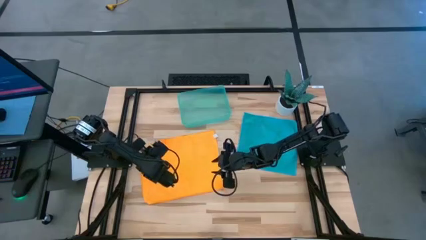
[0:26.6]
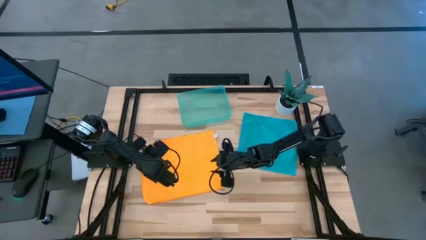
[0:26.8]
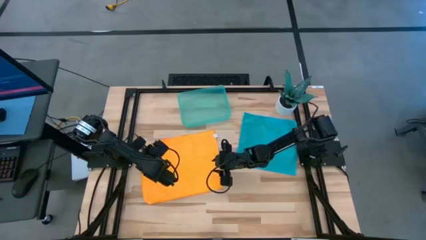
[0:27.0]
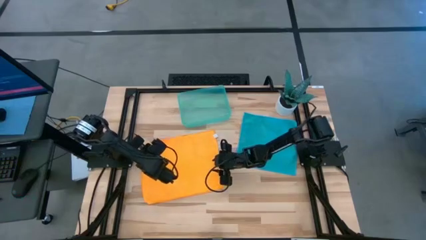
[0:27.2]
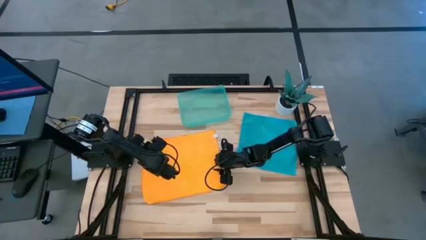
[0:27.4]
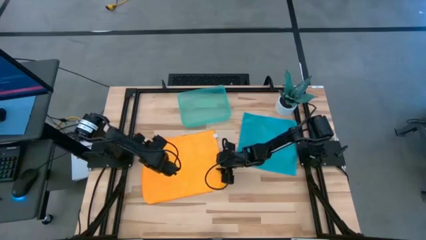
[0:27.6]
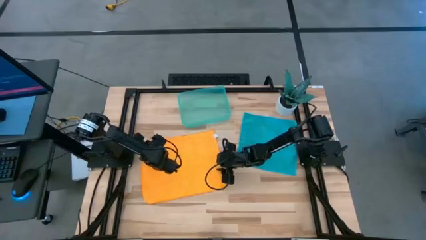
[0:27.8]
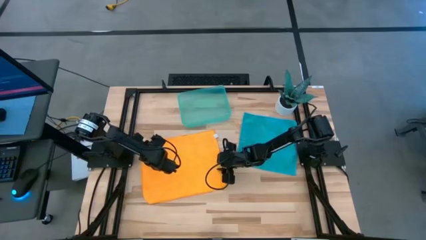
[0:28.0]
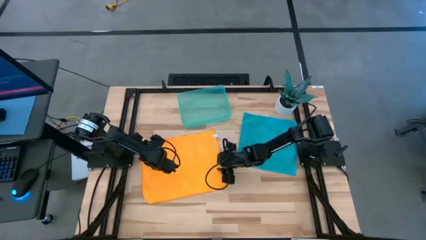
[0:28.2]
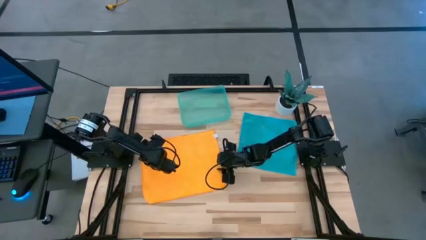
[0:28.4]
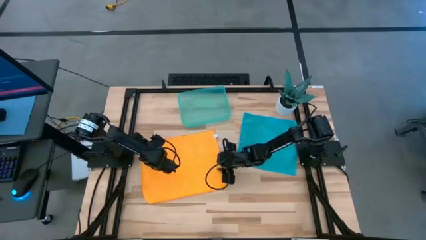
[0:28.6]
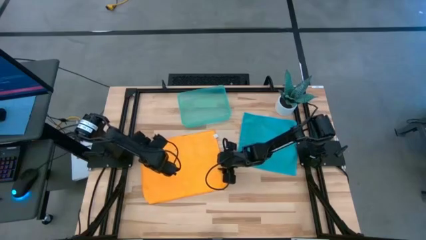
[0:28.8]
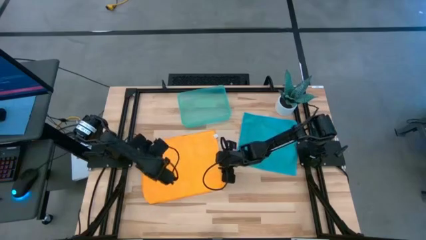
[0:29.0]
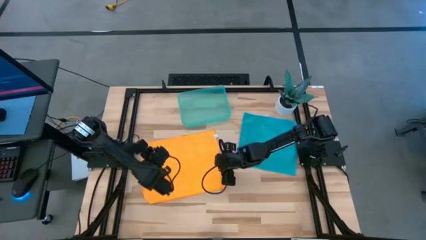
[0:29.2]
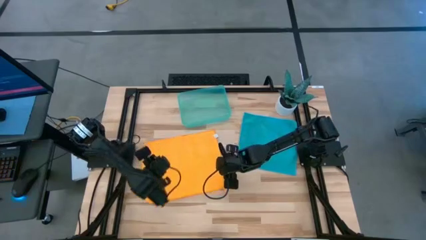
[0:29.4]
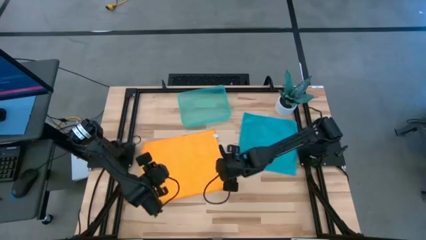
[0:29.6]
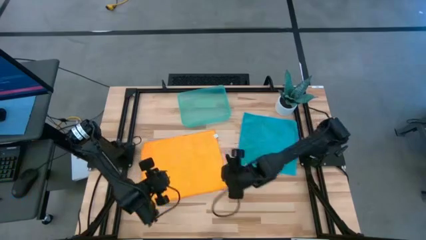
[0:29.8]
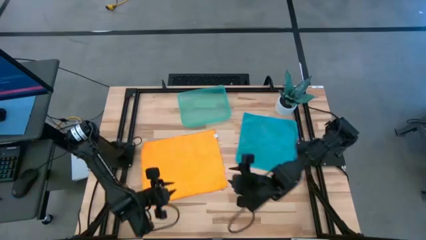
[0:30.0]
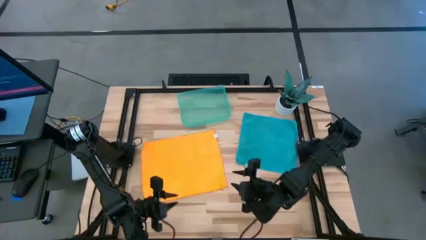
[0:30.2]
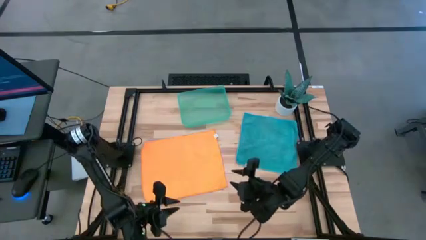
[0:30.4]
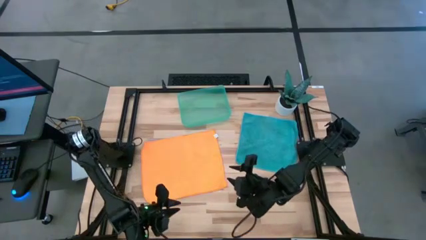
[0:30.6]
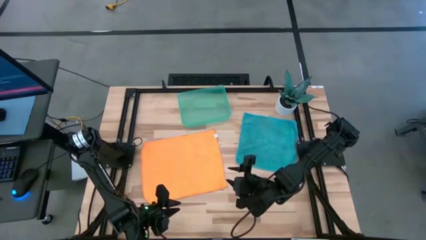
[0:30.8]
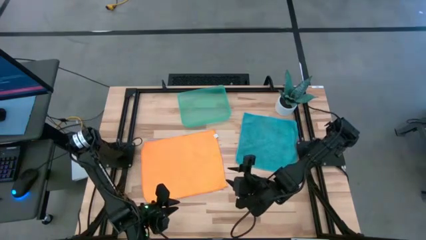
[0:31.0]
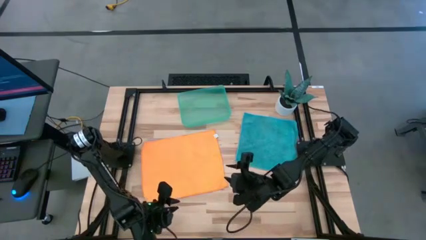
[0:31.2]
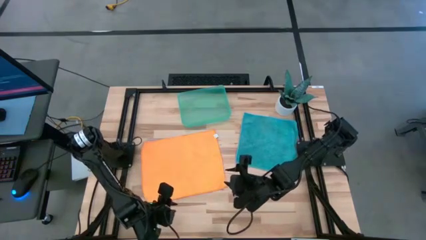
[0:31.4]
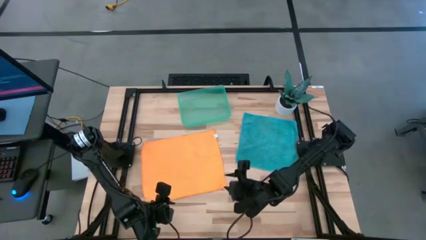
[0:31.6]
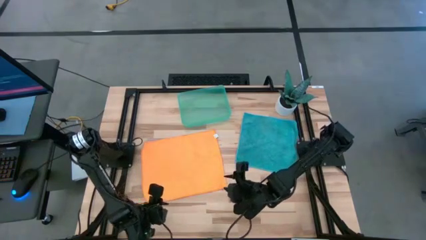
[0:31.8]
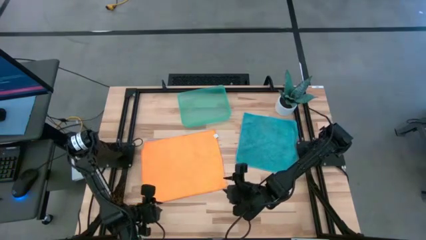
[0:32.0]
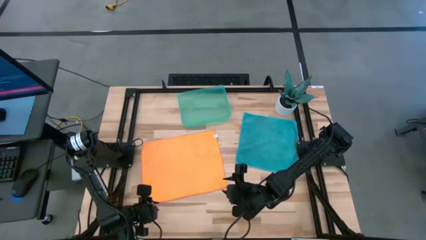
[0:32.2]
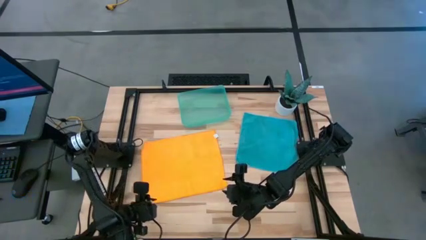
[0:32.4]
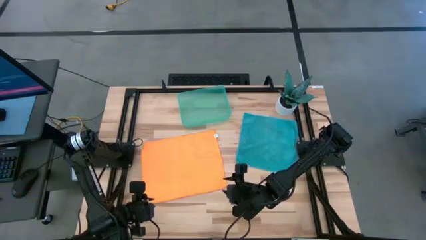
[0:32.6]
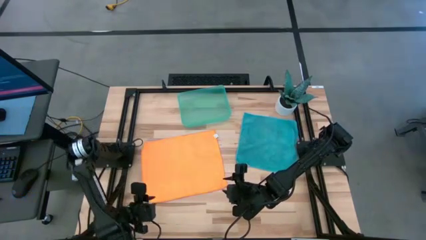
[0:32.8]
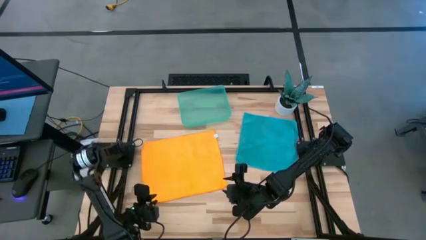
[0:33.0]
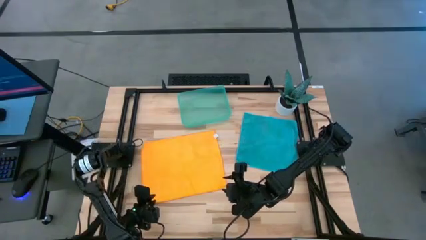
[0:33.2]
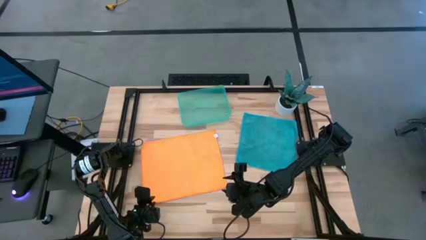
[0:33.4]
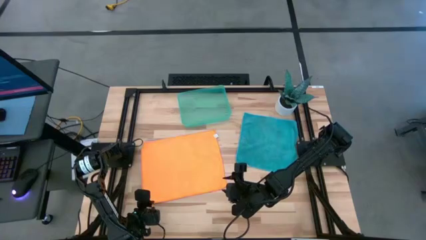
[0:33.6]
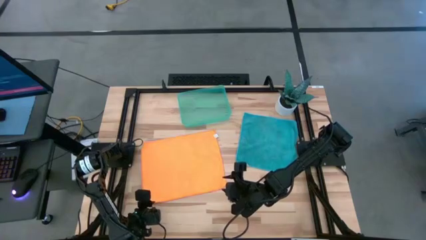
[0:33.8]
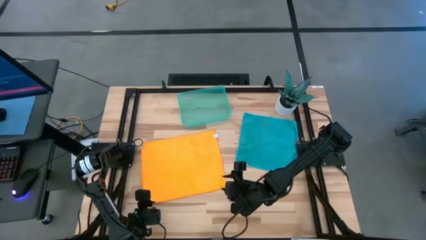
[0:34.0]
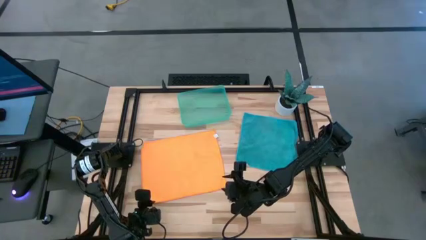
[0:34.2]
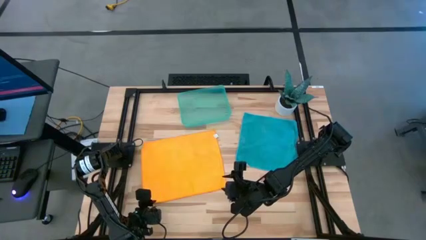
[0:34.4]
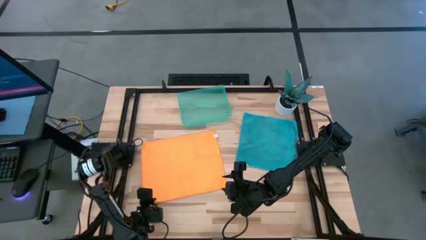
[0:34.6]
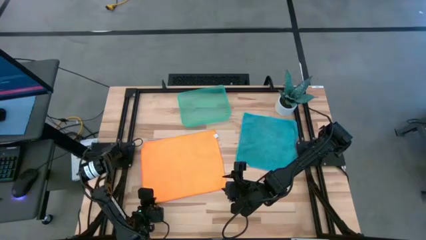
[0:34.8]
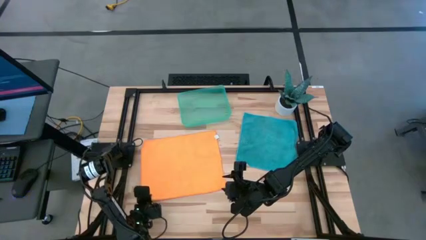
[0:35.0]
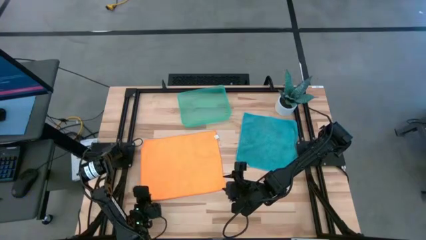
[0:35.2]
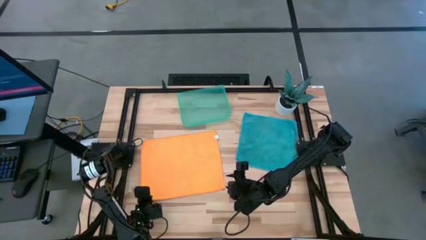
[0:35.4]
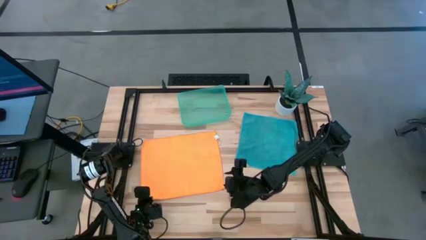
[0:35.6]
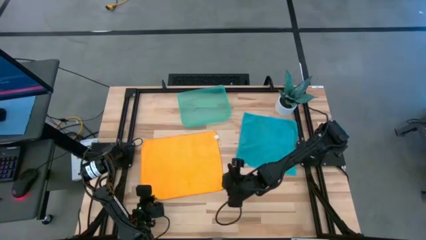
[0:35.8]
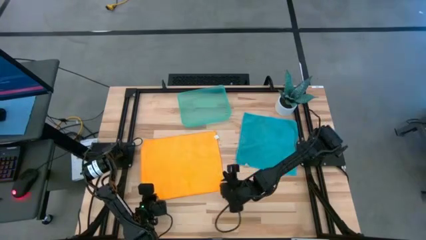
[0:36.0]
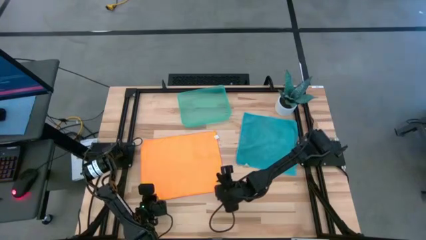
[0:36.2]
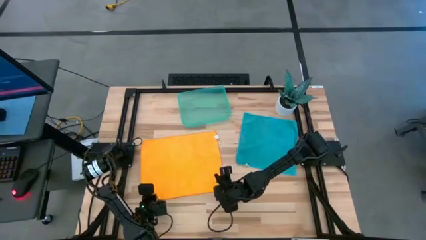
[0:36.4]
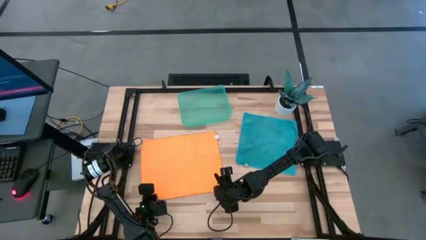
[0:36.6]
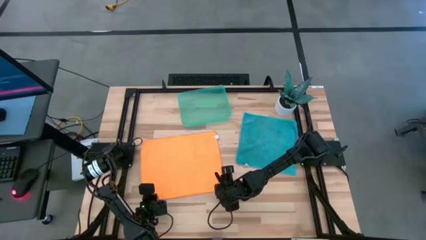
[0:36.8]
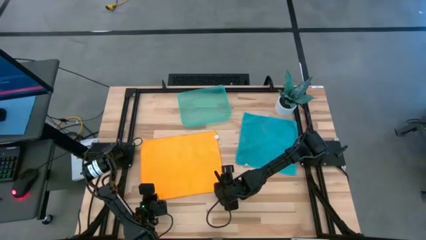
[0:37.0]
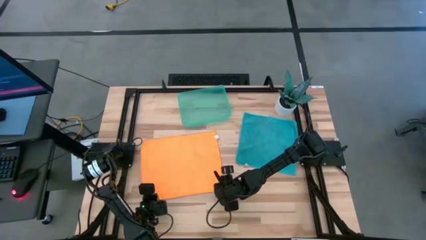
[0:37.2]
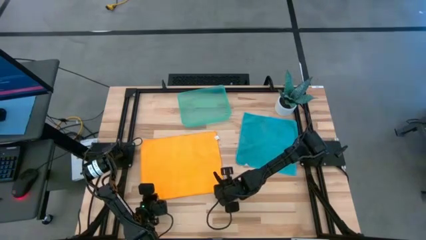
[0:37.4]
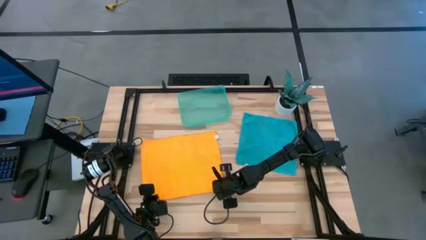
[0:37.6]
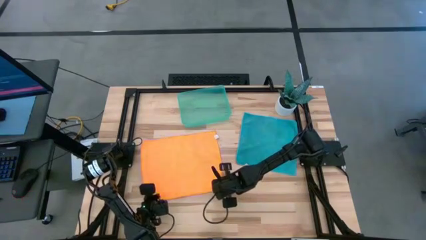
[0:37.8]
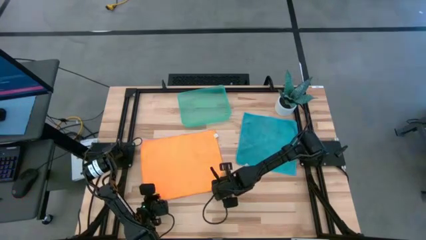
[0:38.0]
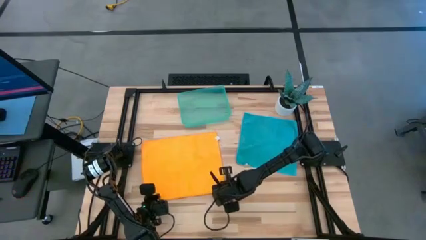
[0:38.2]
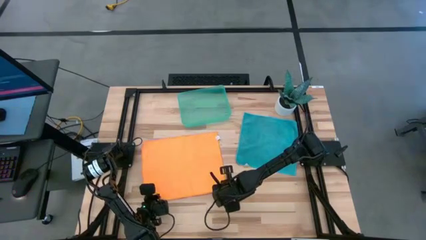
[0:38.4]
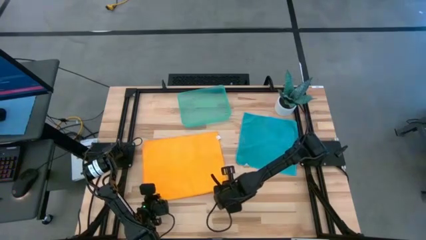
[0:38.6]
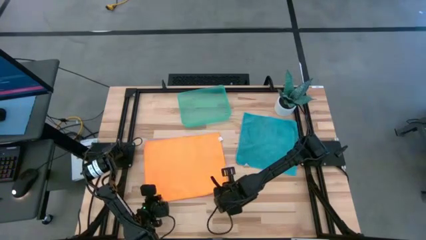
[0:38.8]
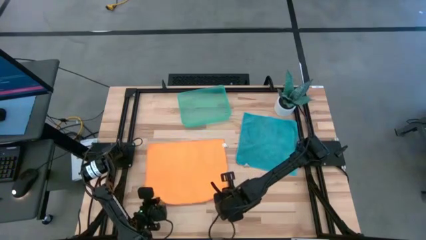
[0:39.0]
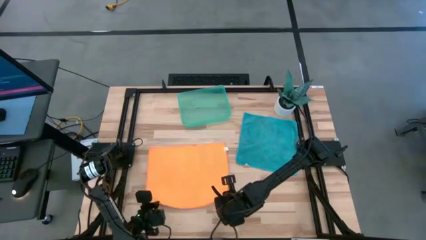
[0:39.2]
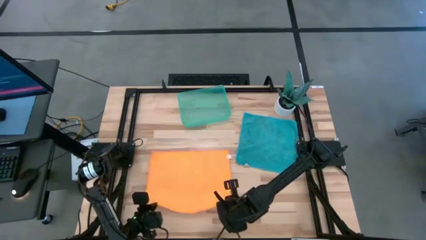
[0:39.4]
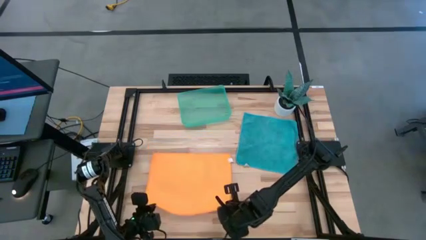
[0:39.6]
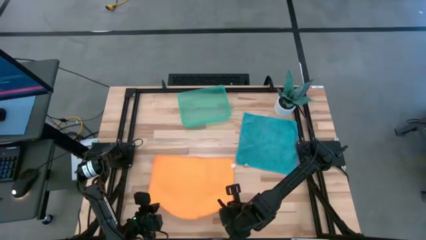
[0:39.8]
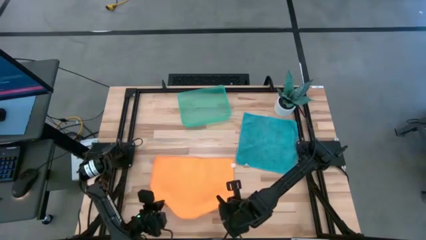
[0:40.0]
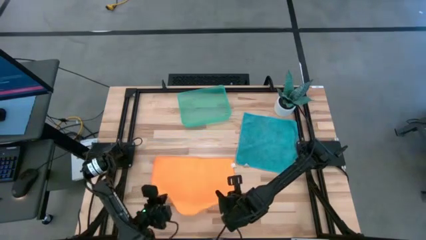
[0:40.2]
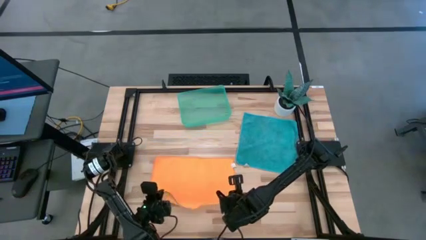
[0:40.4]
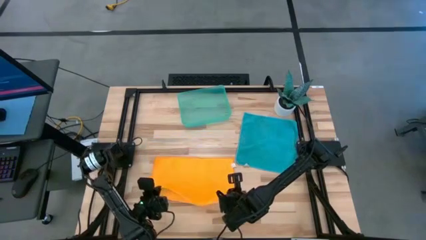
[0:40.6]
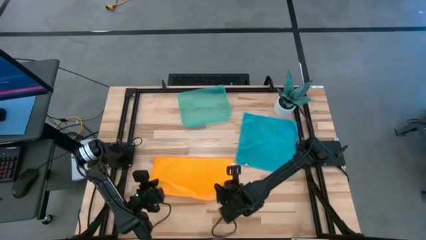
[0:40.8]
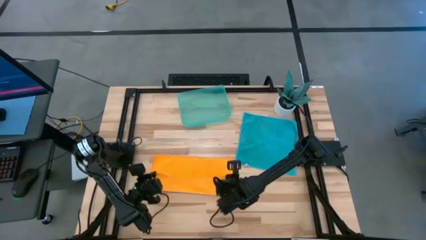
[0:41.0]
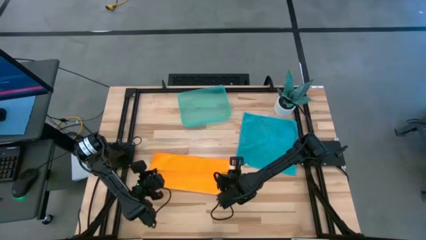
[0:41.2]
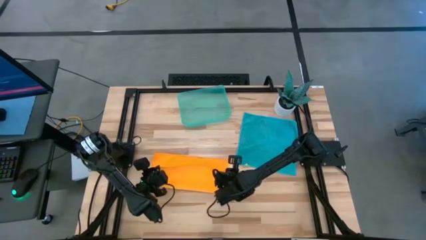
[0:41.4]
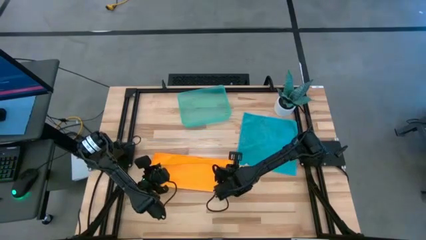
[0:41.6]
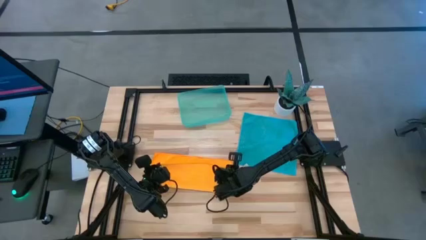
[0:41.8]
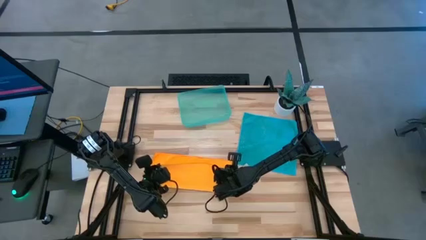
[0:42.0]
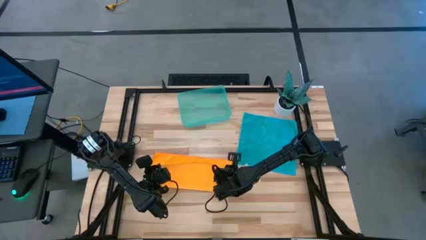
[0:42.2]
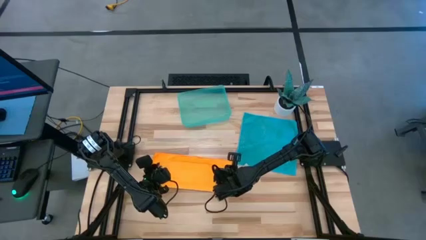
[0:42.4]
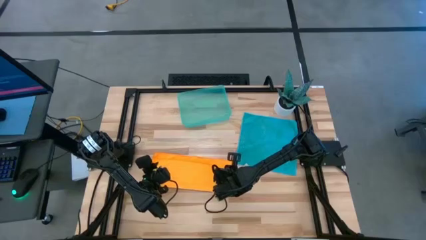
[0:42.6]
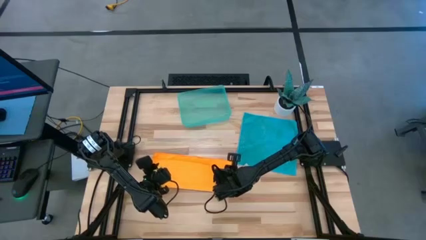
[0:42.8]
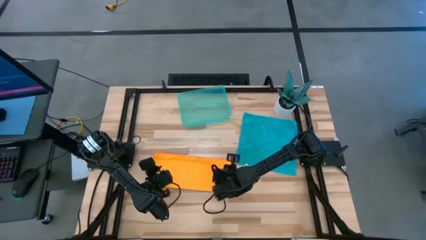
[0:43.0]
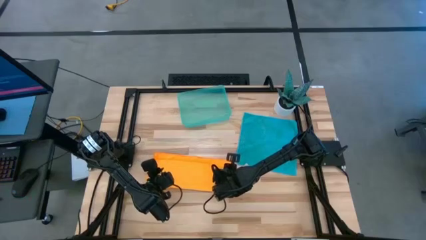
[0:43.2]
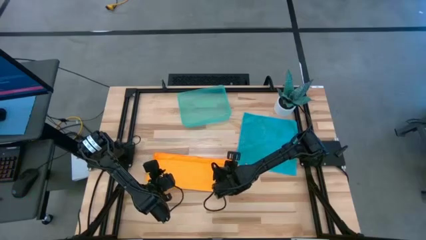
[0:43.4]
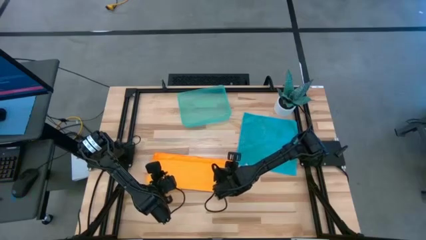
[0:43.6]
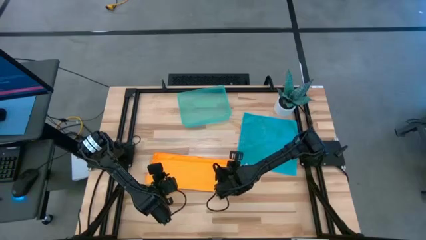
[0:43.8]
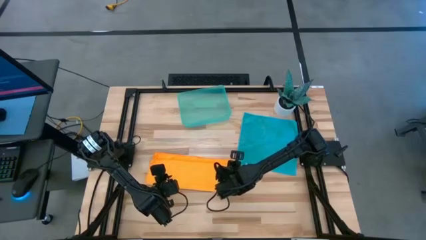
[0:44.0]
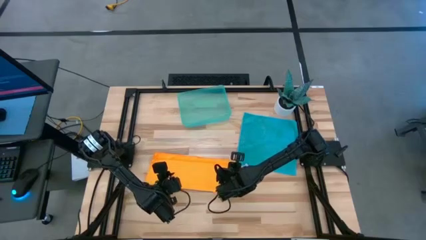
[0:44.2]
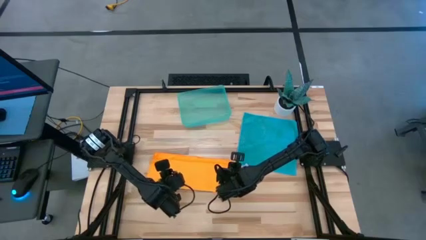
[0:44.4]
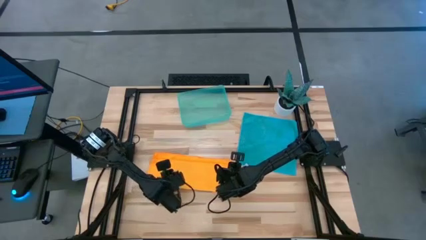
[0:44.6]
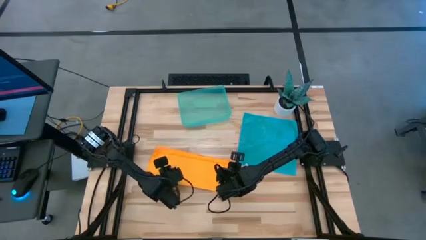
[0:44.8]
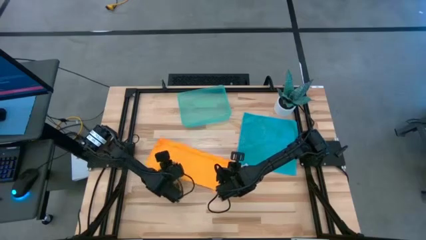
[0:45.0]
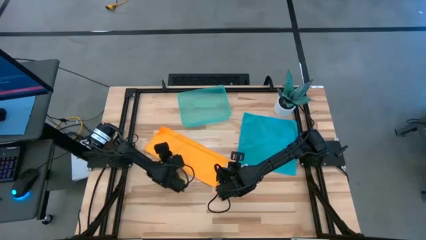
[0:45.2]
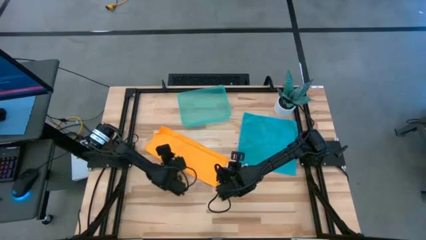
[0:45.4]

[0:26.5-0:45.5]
Task: Roll microfiber towels into tight, uniform cylinder then place into a basket
Roll the yellow microfiber towel
